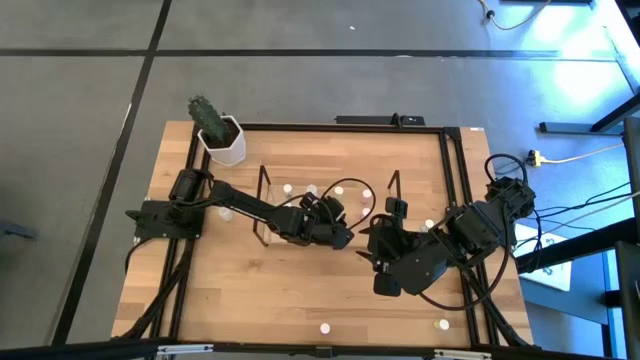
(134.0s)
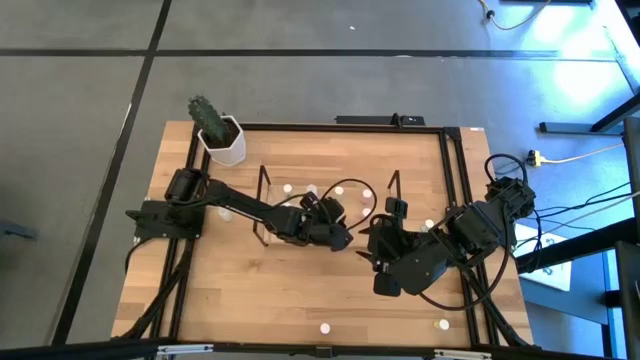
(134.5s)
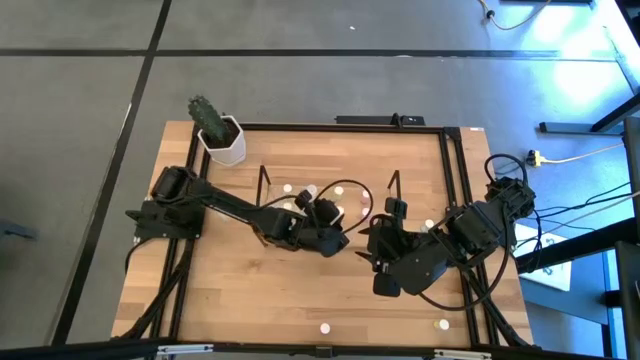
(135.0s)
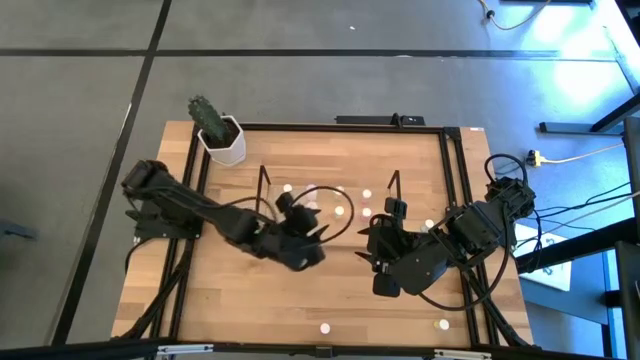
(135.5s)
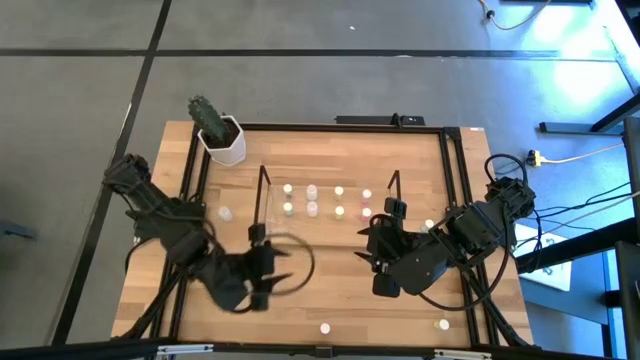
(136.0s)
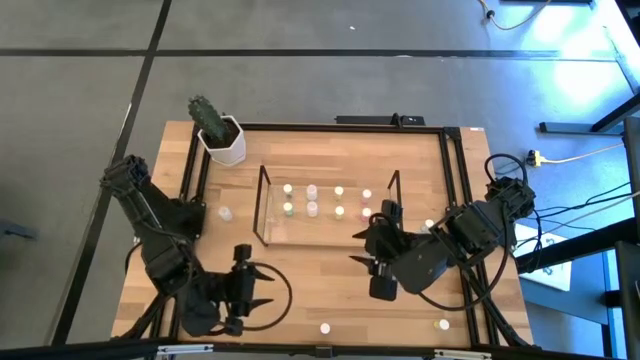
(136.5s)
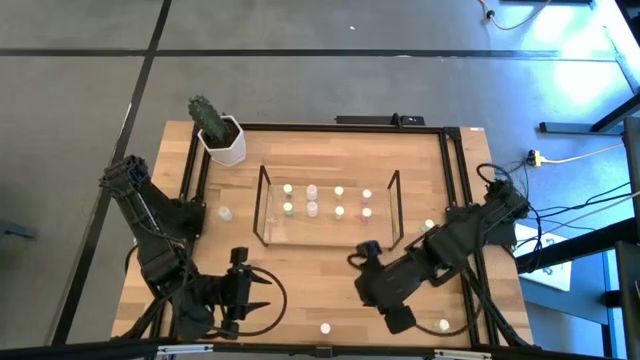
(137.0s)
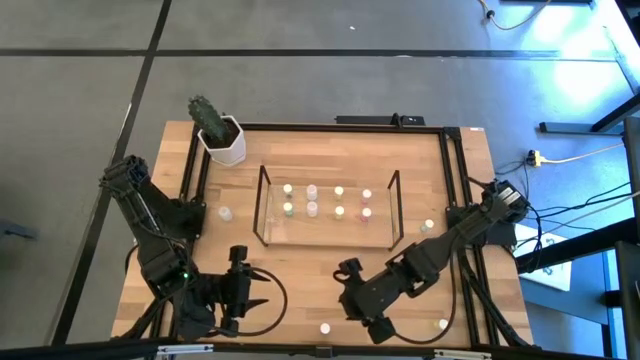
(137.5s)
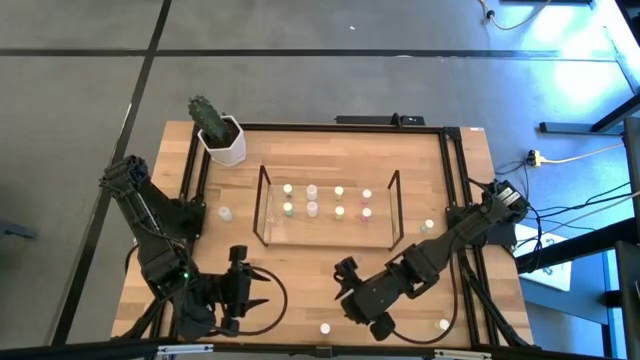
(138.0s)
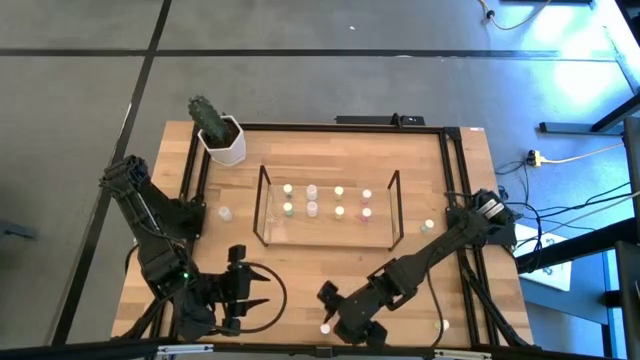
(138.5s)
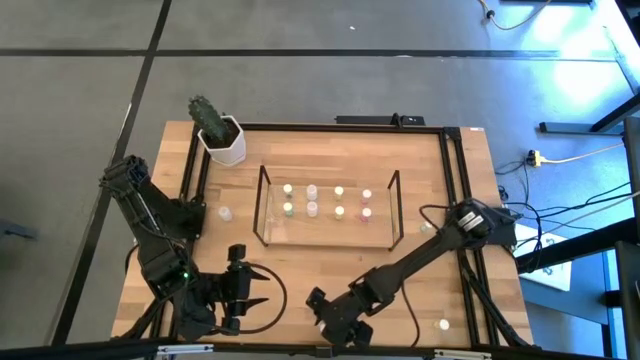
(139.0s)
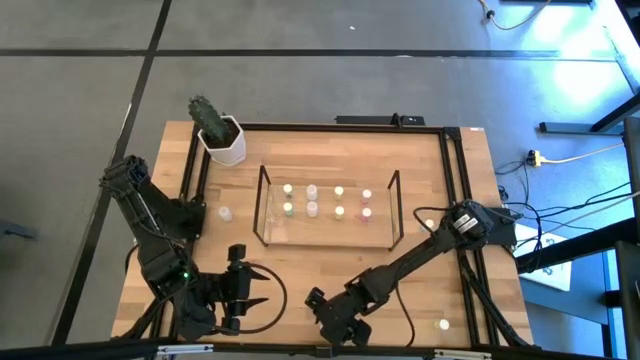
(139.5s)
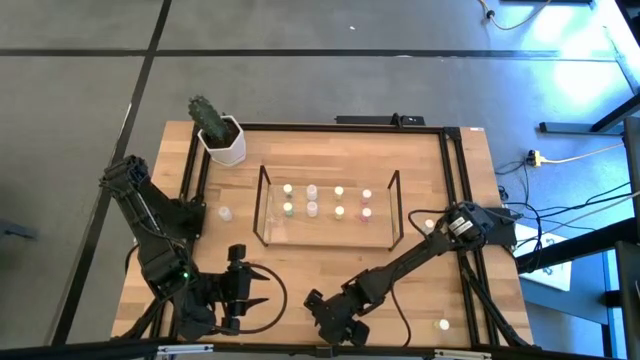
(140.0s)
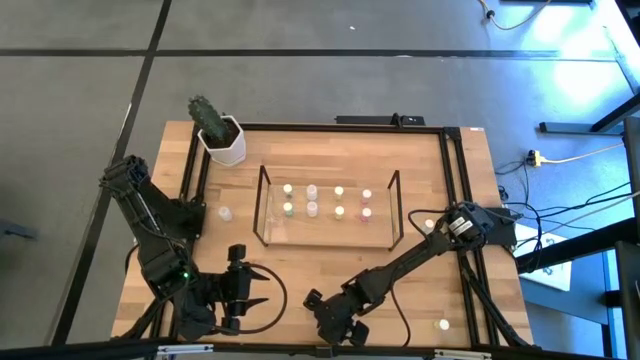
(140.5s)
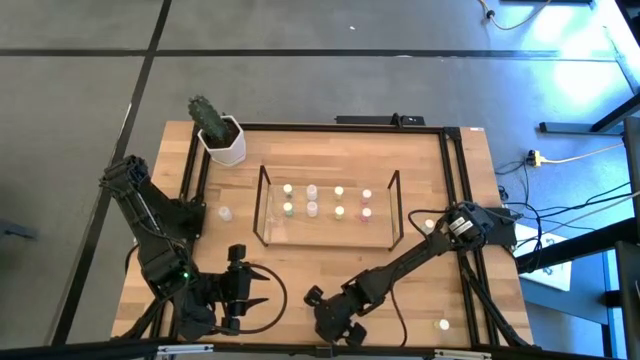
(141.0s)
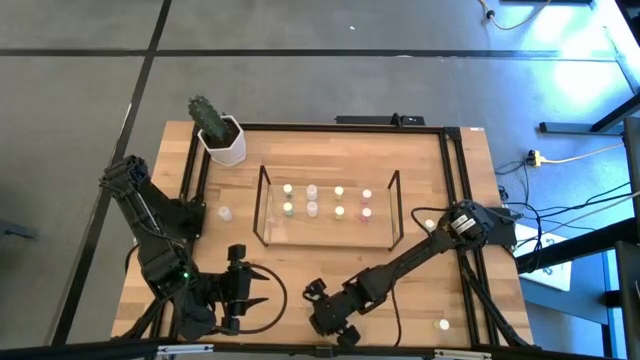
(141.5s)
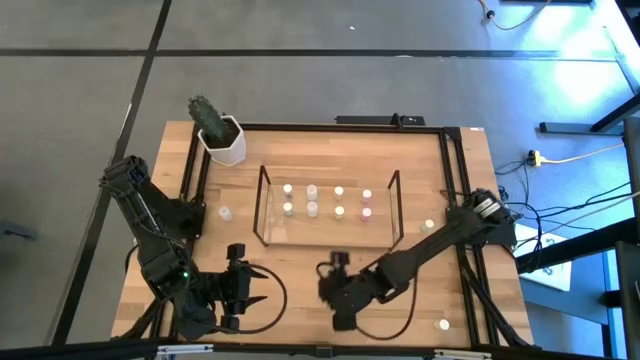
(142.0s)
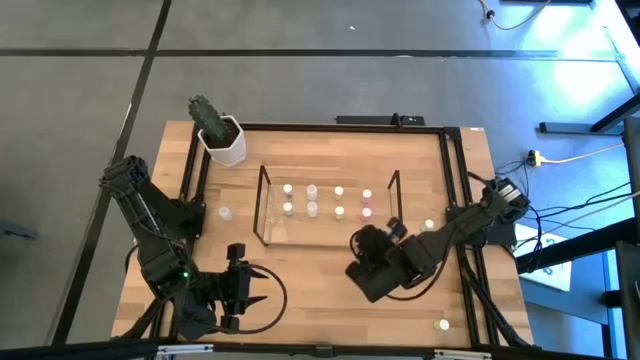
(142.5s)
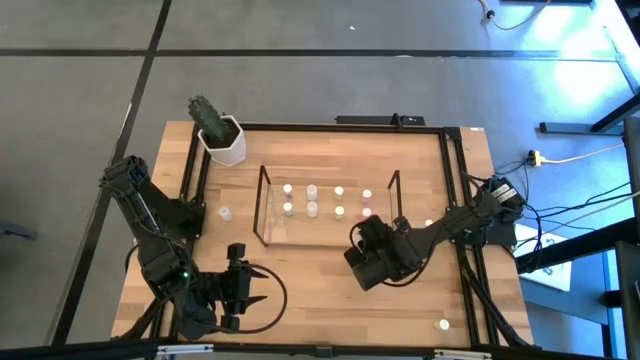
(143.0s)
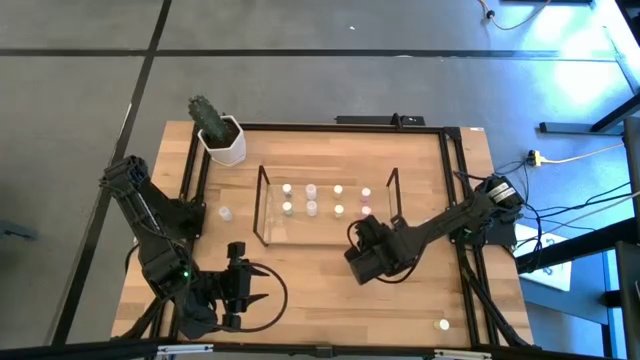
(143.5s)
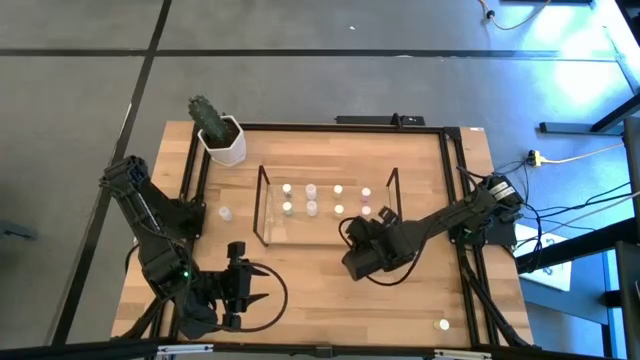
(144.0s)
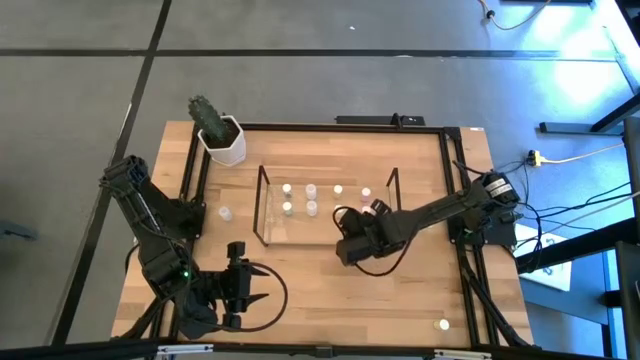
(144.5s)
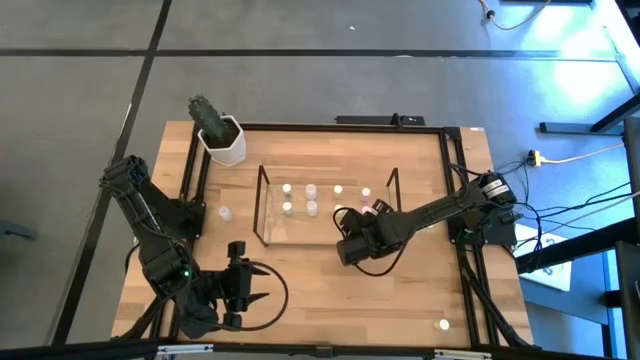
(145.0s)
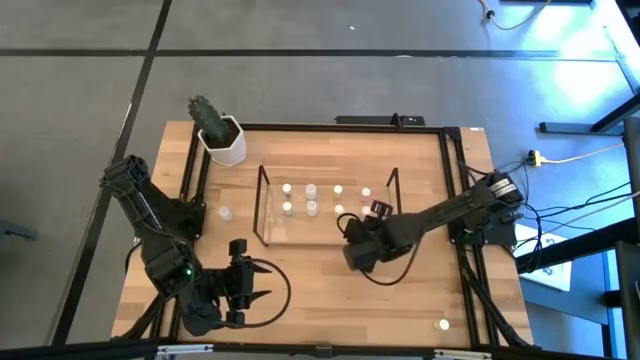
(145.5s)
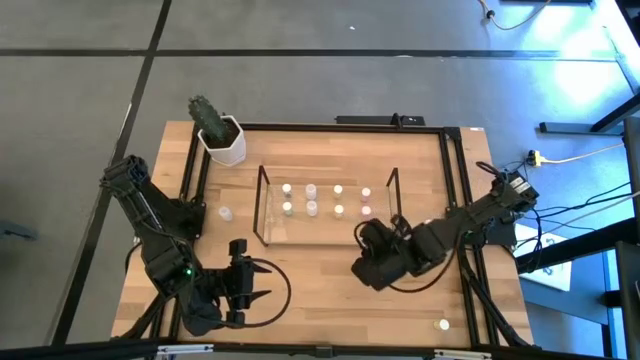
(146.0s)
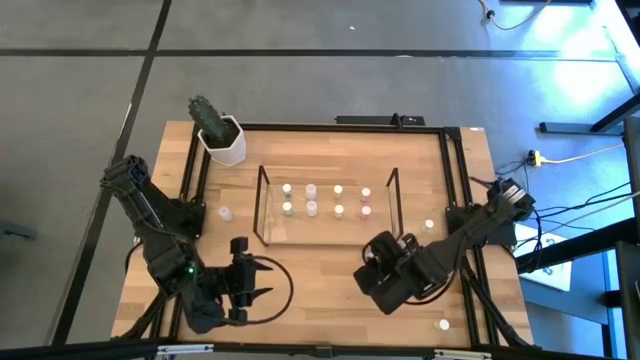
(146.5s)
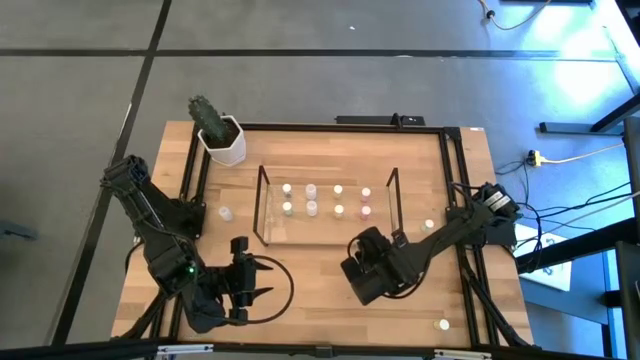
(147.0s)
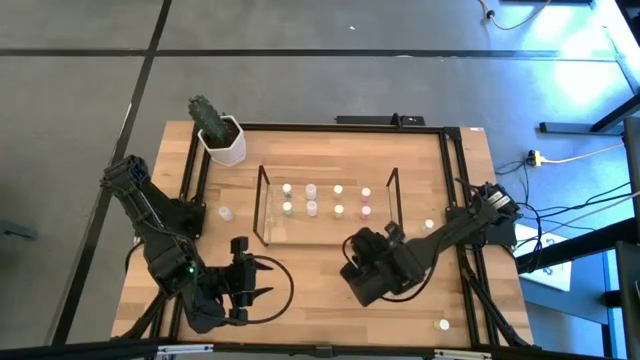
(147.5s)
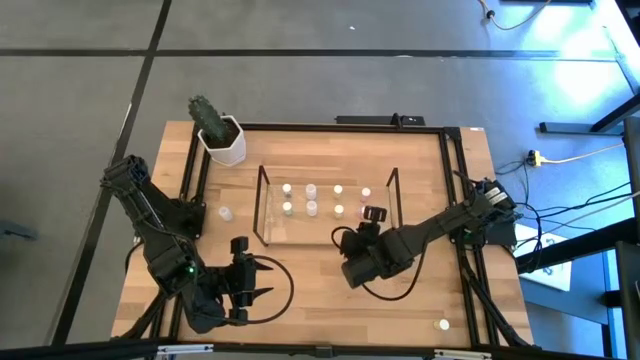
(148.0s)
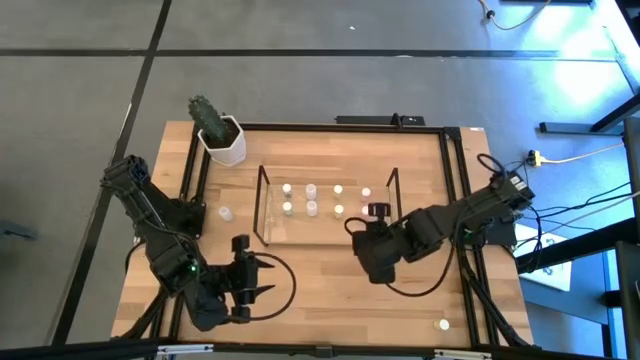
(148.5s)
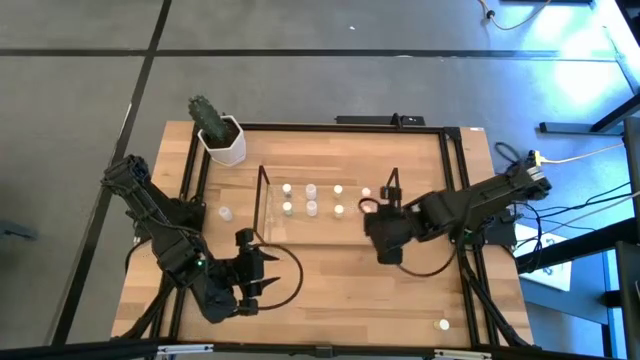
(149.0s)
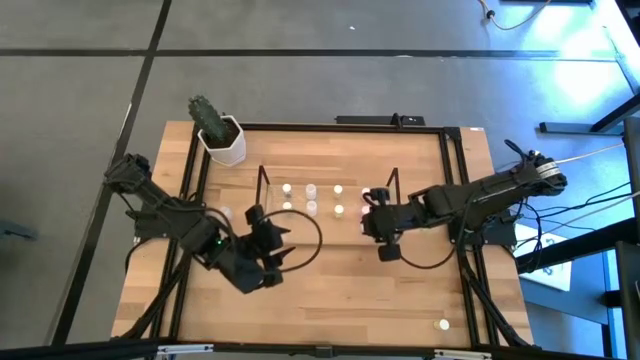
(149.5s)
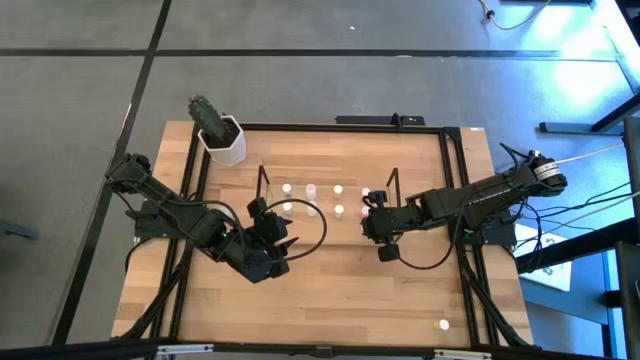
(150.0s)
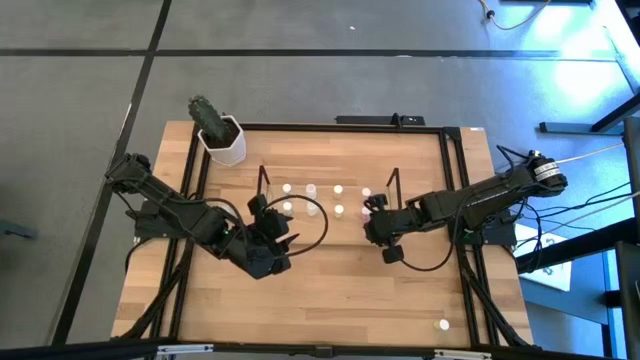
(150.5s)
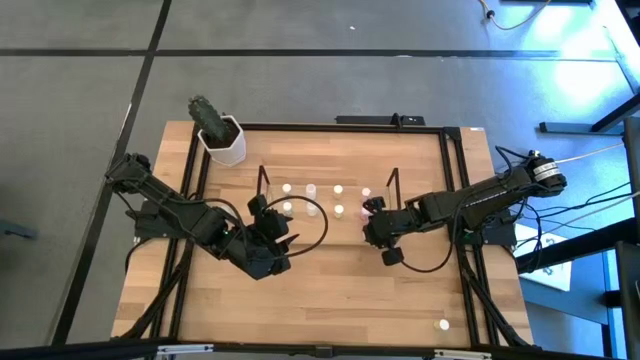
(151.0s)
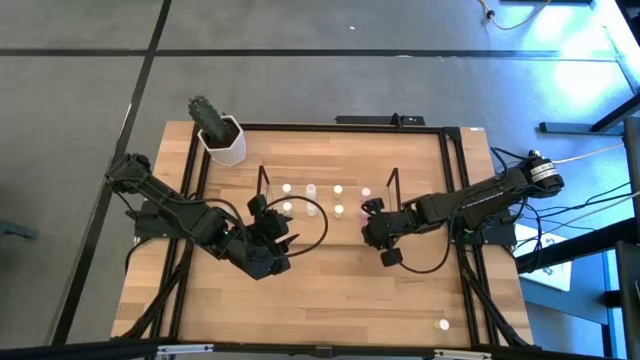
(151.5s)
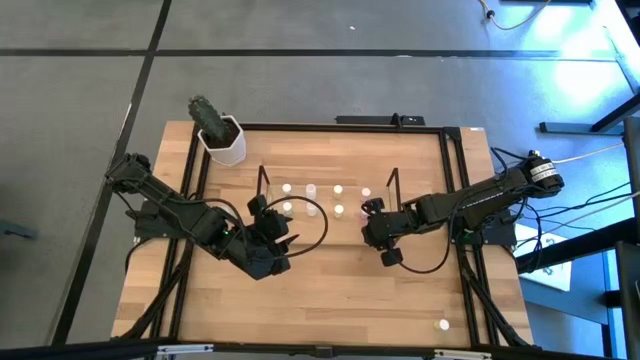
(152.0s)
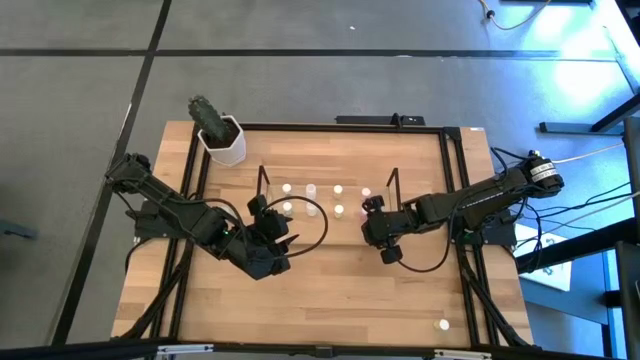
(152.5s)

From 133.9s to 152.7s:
Task: Pick and place medicine bottles onto shelf by color
Put the pink pill bottle aligned with the other pink pill bottles on the shelf

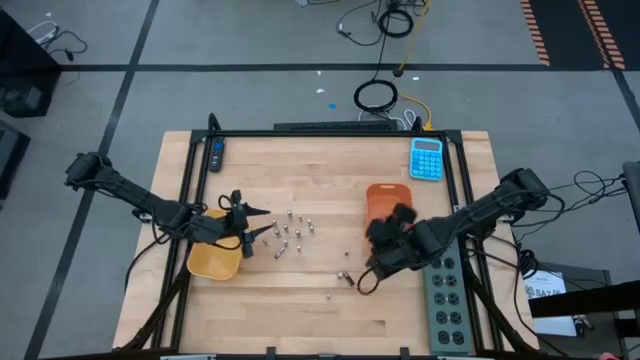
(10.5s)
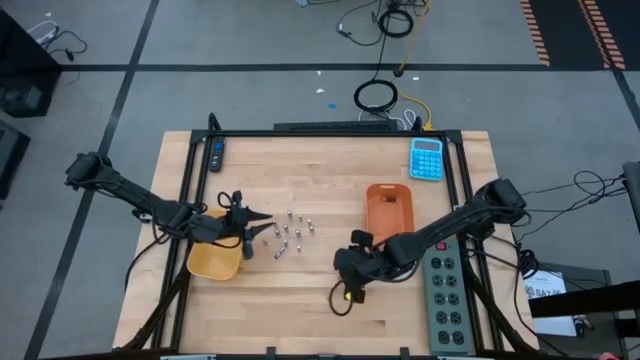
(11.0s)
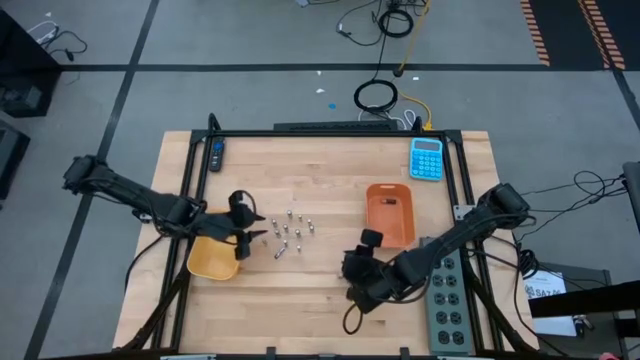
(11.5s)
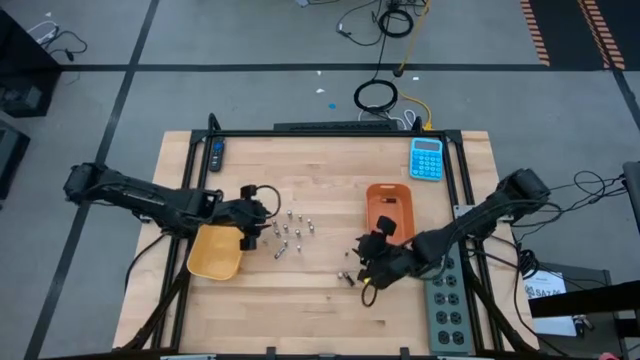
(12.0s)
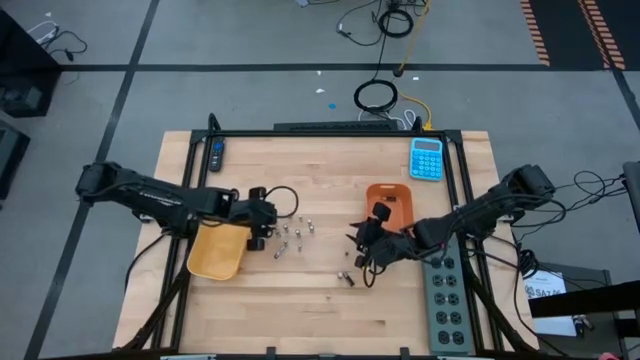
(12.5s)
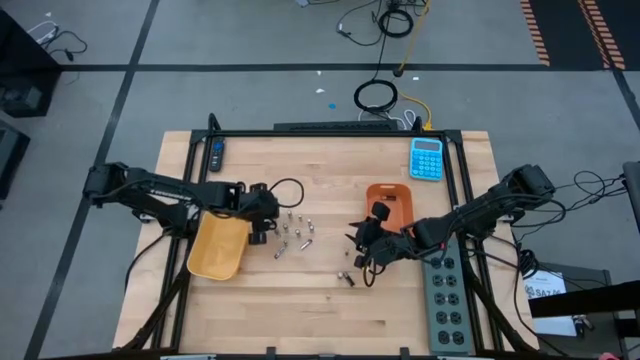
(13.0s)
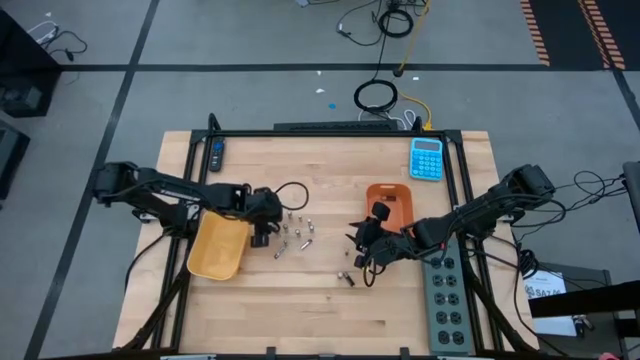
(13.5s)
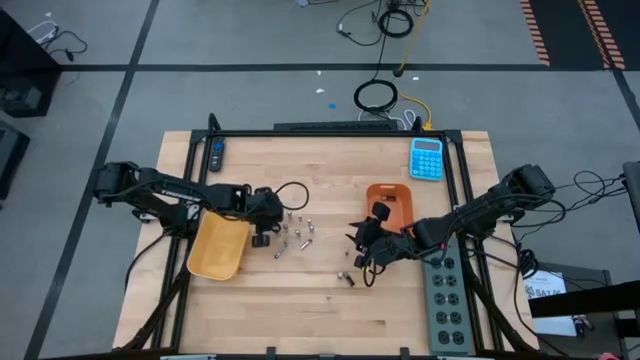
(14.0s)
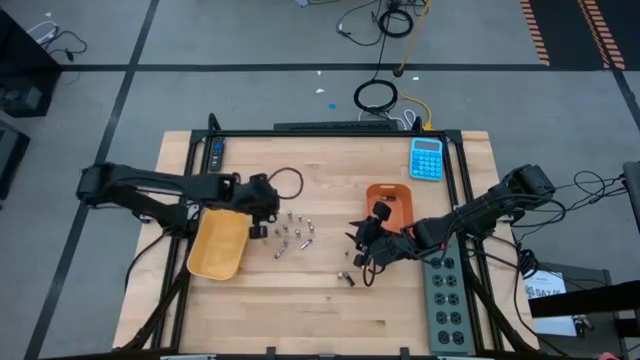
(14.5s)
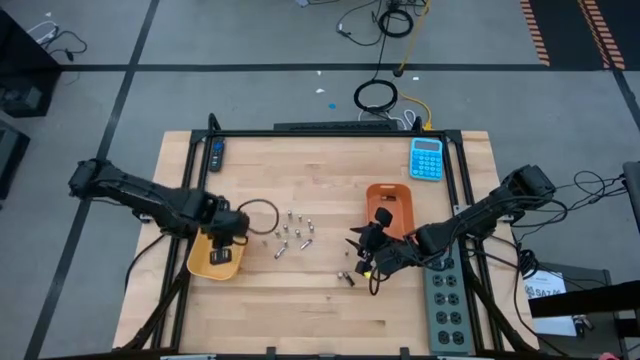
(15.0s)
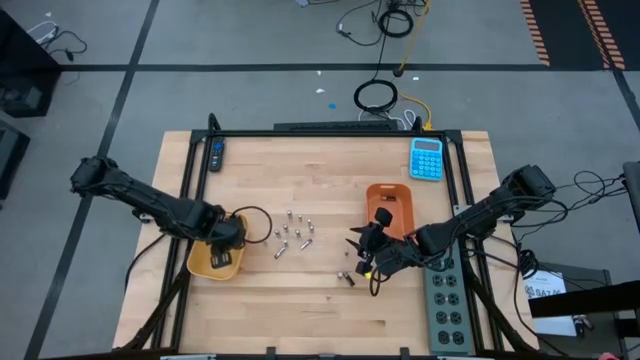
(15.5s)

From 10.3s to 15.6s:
Task: Sort batteries
Put the silver battery into the yellow bin
